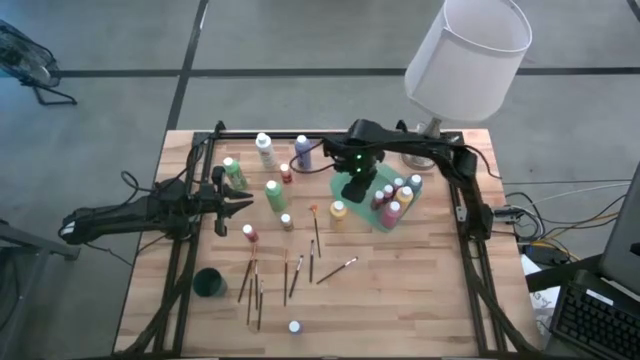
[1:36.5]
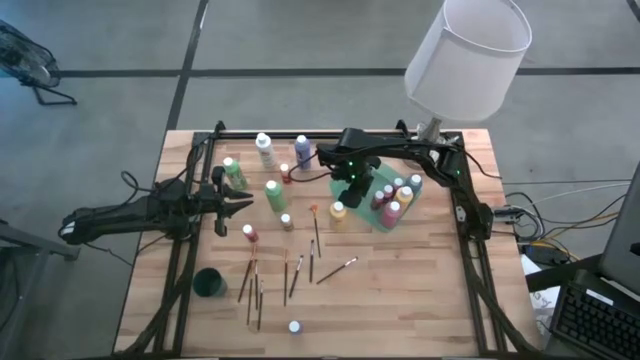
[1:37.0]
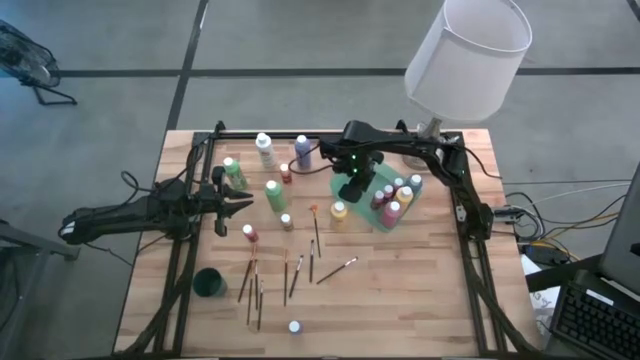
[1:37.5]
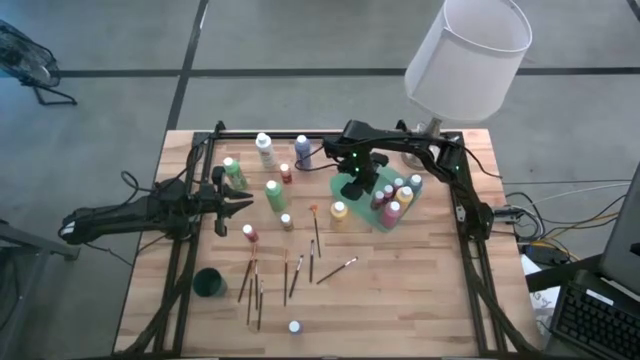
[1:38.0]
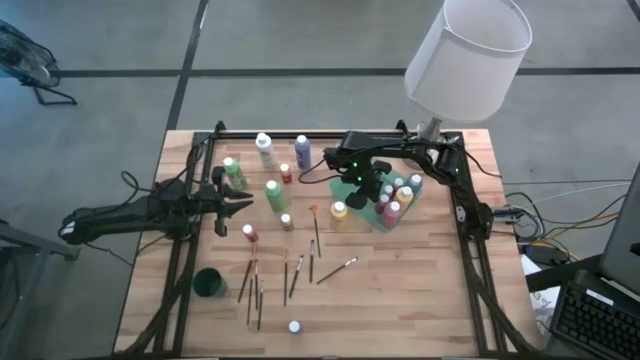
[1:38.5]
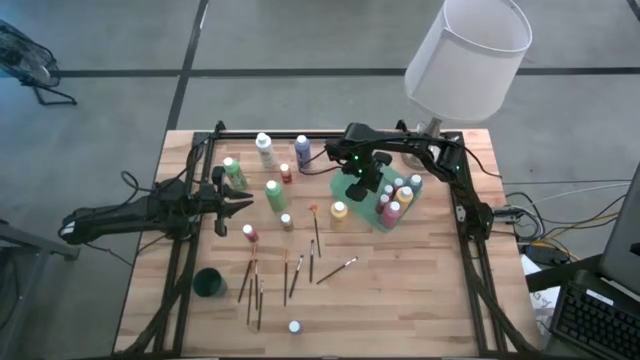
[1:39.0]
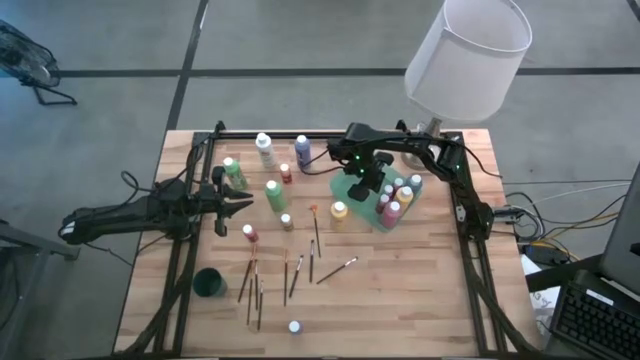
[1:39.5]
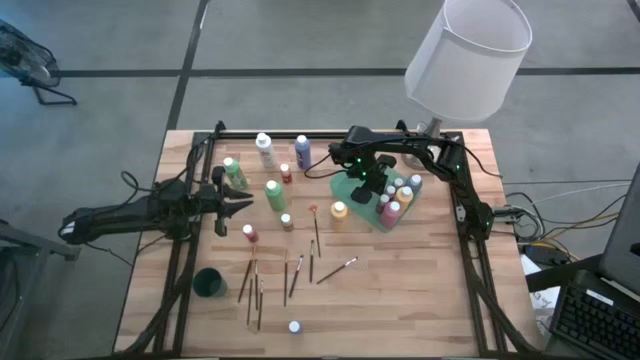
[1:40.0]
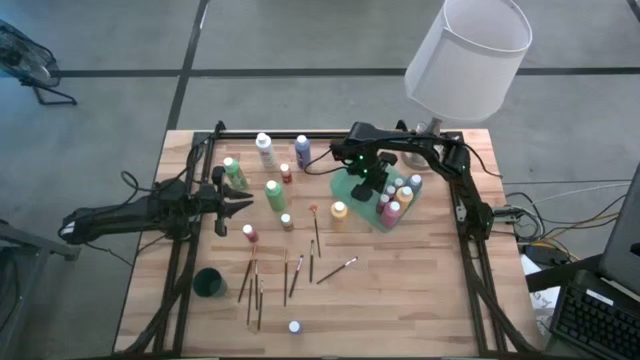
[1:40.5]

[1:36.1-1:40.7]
Task: Pick & Place Paint Supplies
Adjust the red and pick paint bottle in the green bin

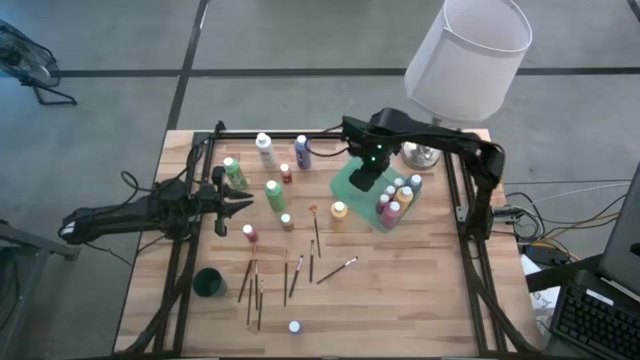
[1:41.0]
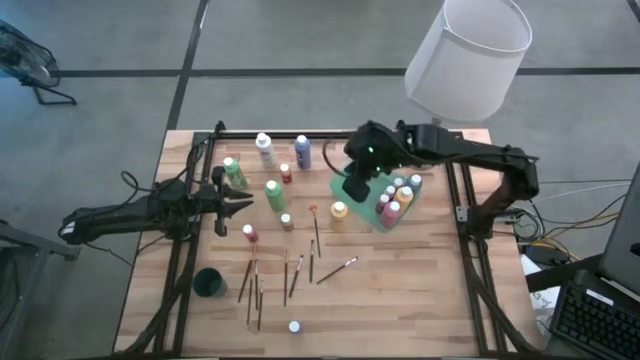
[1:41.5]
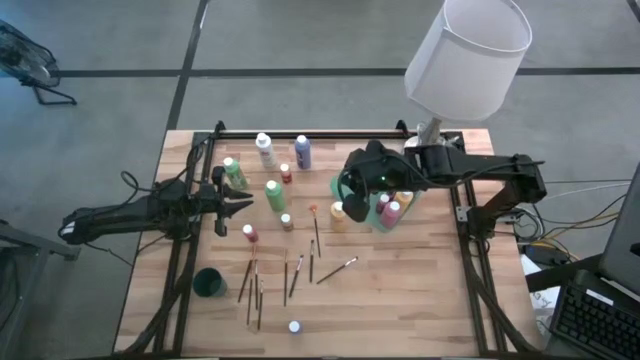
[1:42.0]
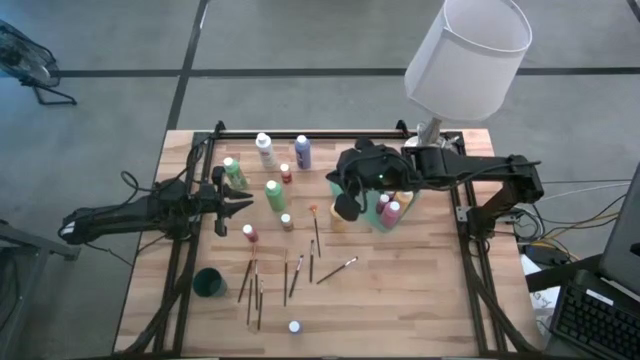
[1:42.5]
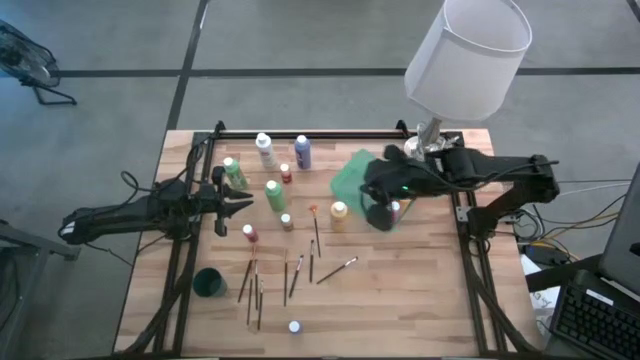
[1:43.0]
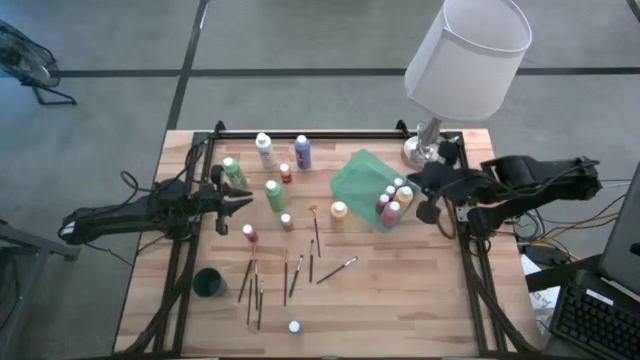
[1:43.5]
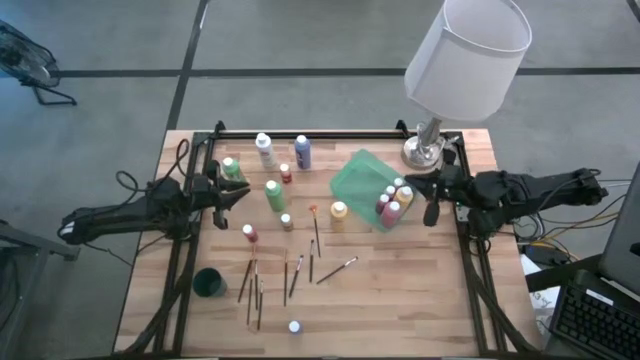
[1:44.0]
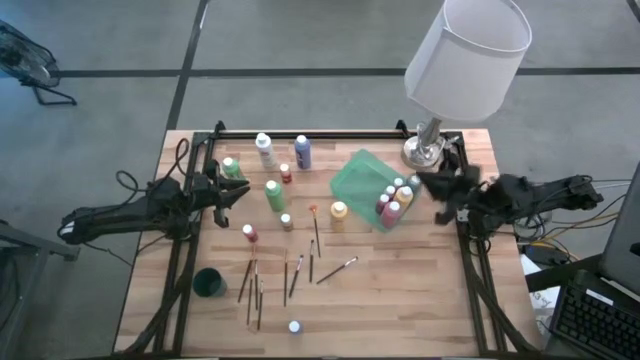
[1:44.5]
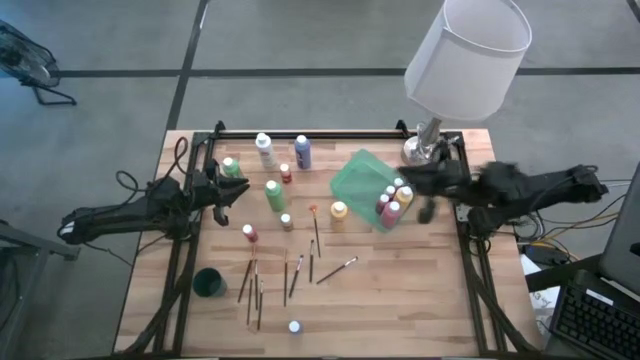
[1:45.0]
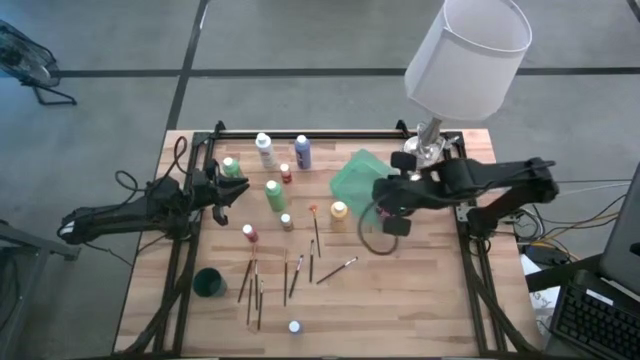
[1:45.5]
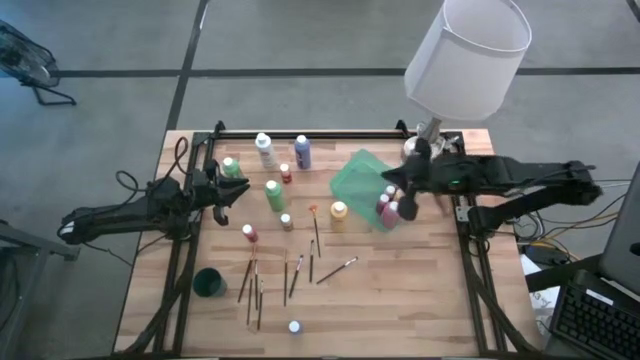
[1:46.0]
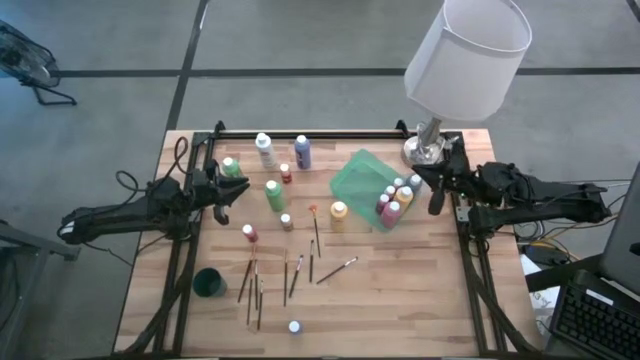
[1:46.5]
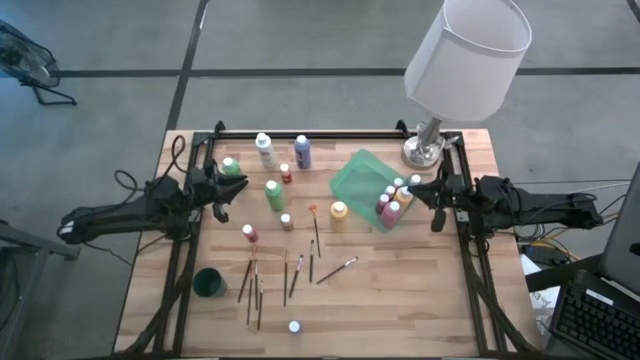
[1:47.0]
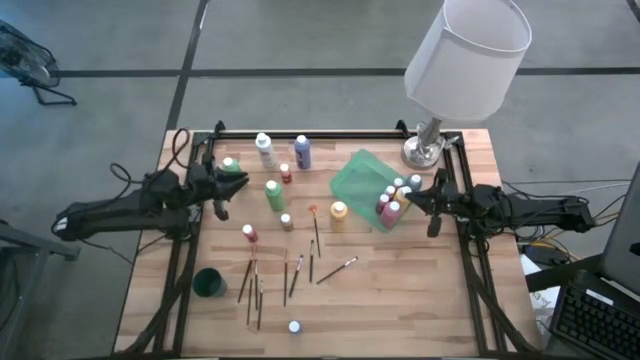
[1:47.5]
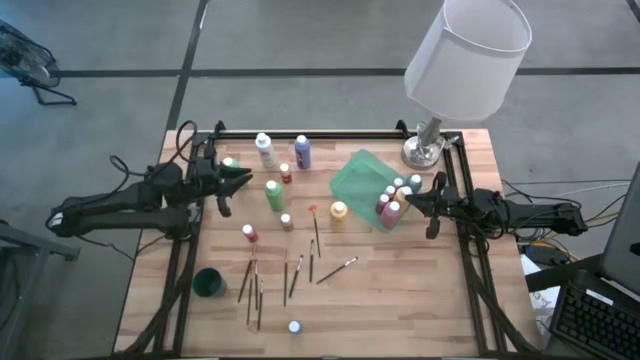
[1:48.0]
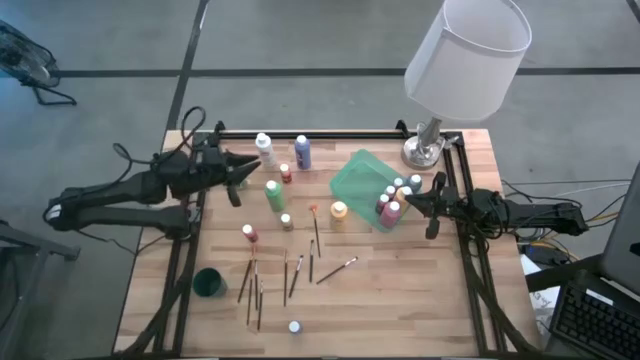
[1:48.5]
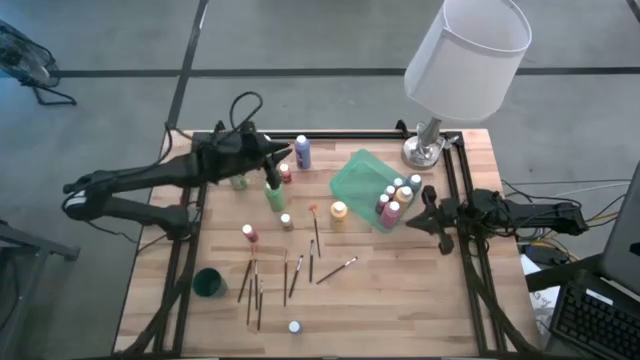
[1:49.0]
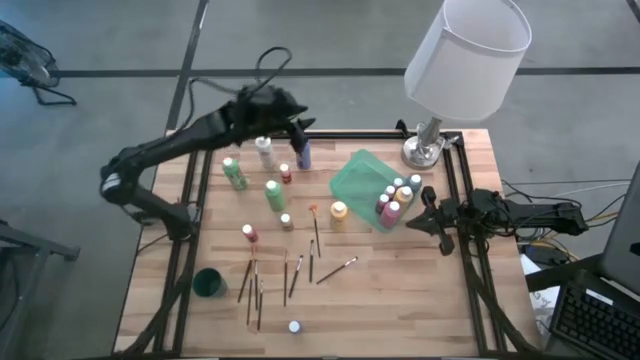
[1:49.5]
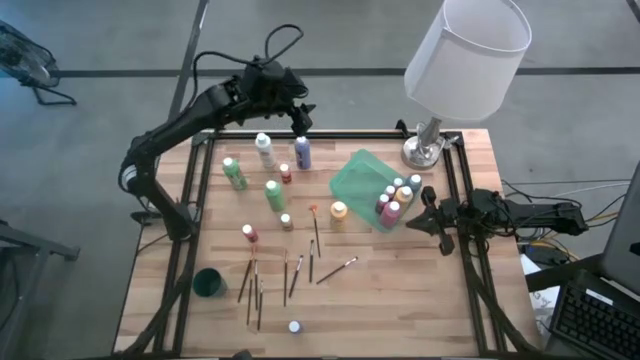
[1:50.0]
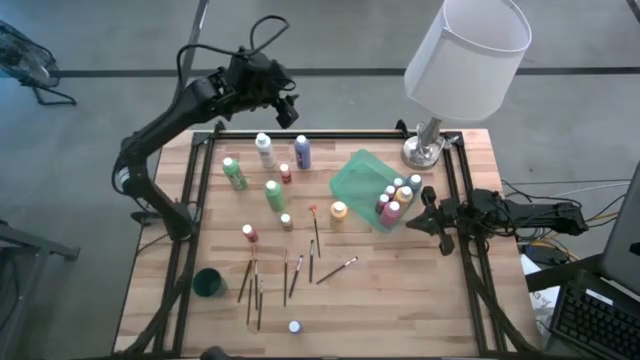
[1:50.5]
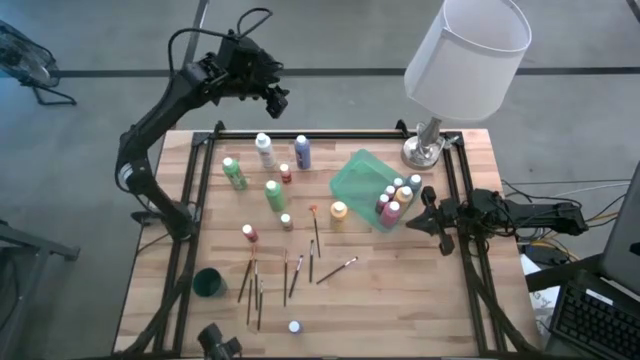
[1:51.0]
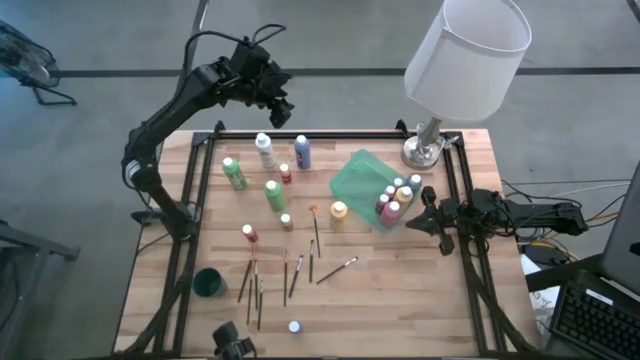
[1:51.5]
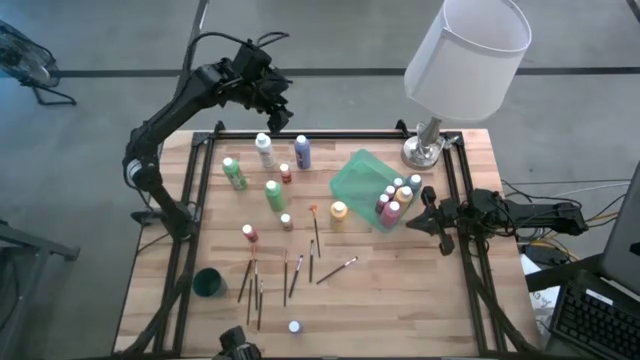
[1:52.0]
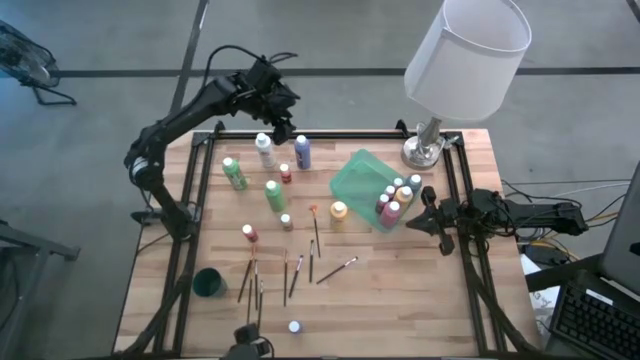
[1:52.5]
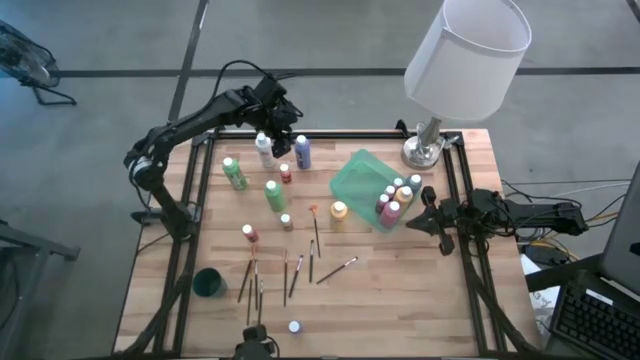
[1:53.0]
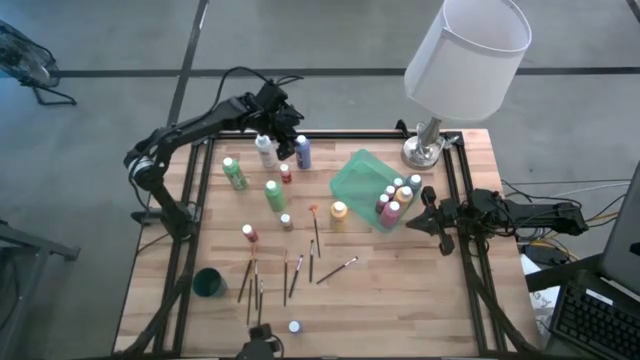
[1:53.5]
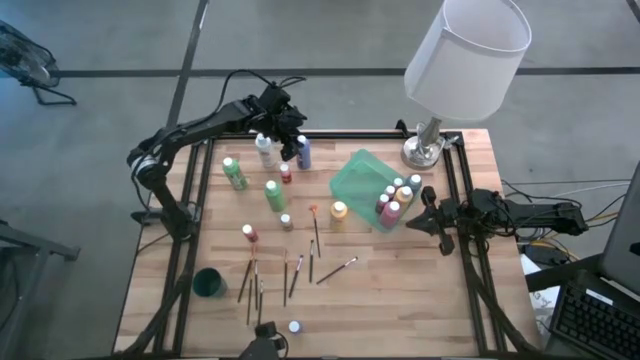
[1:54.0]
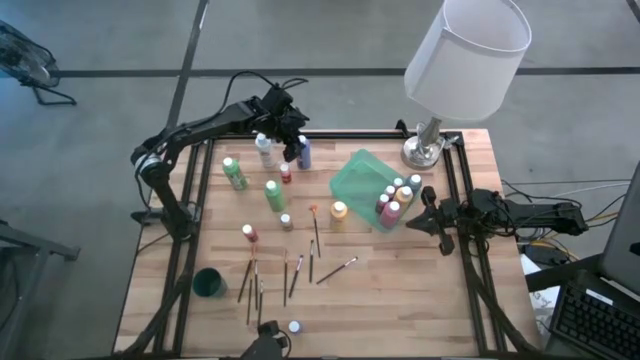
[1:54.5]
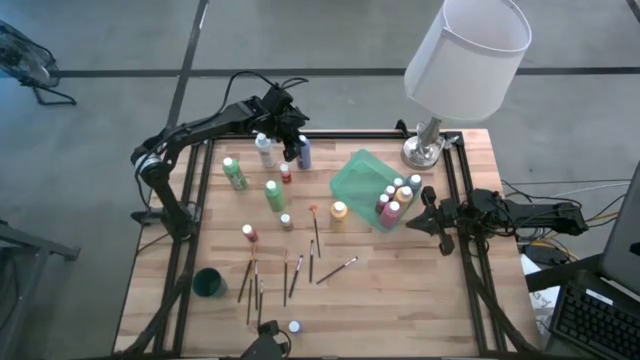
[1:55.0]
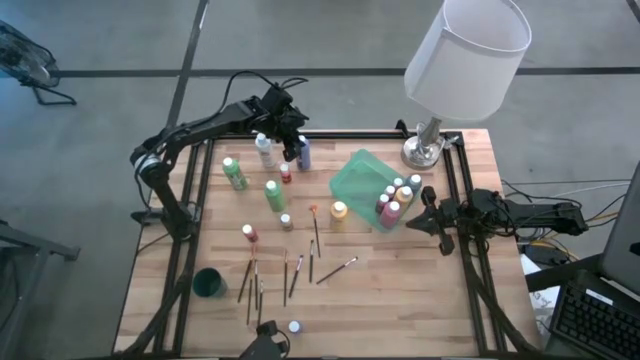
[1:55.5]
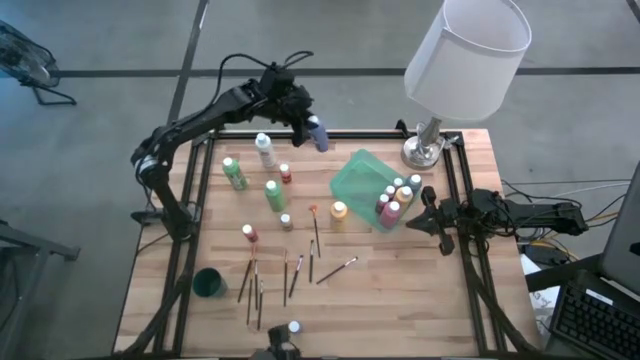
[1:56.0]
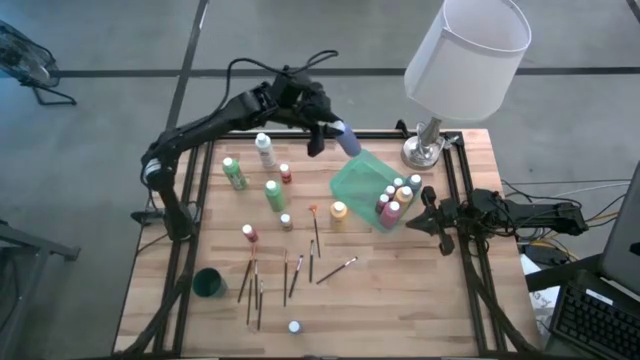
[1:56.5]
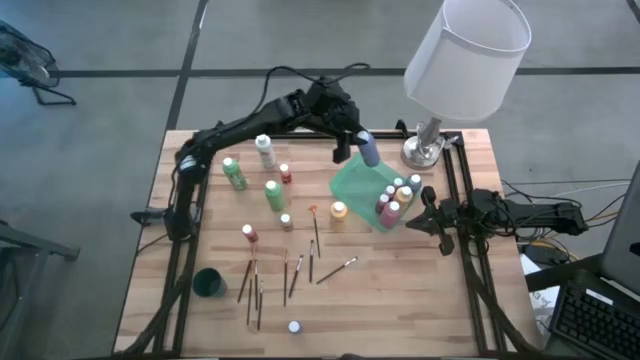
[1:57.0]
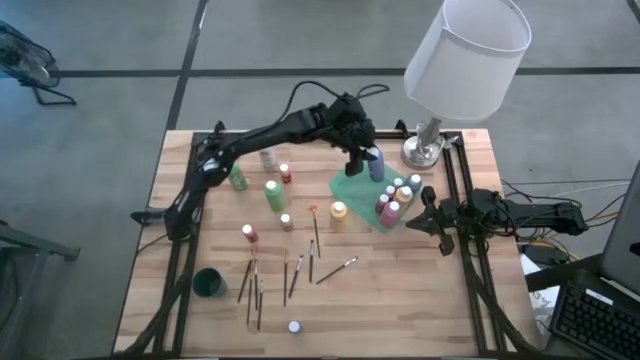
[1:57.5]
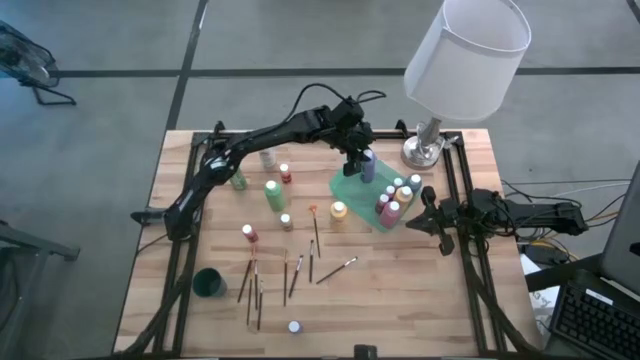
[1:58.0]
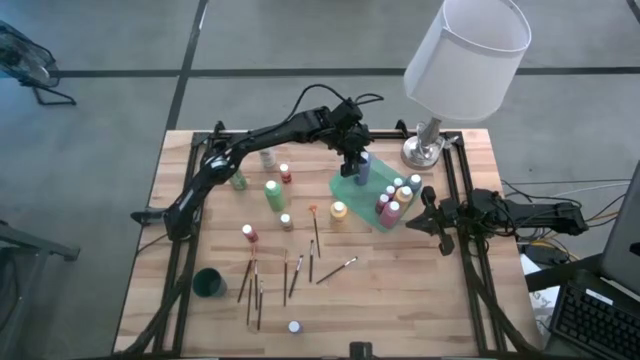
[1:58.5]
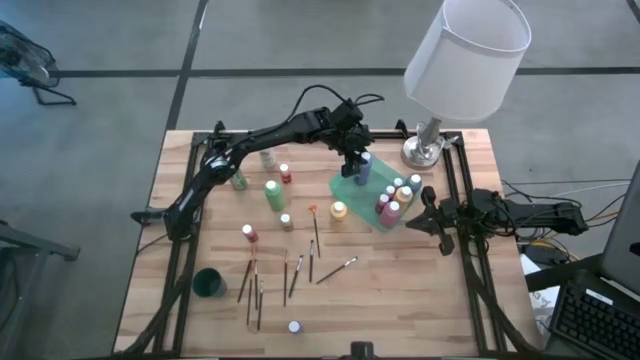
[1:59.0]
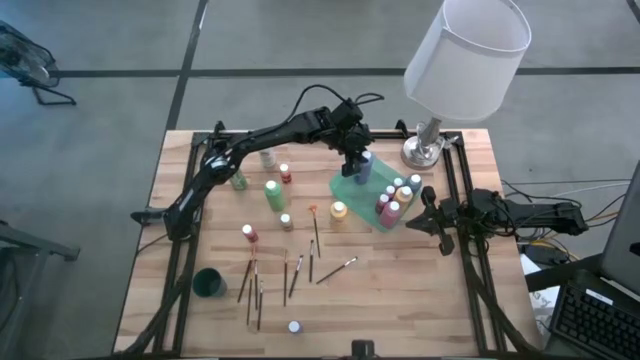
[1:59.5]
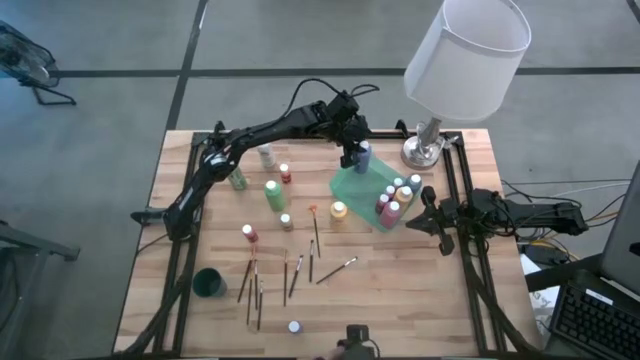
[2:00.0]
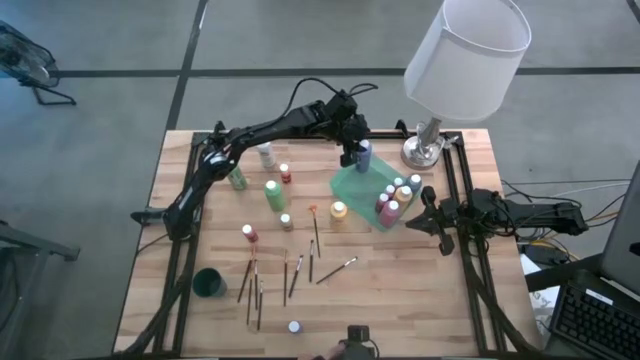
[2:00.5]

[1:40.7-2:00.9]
Put the big blue paint bottle into the green bin
